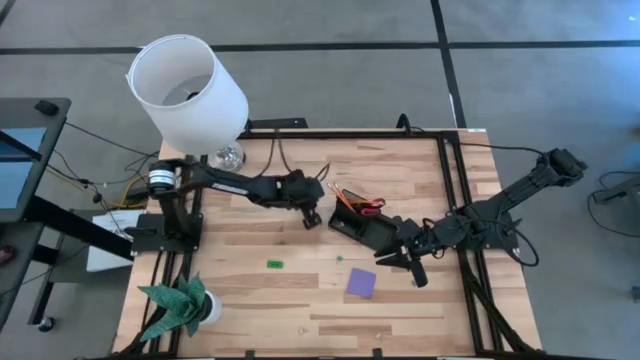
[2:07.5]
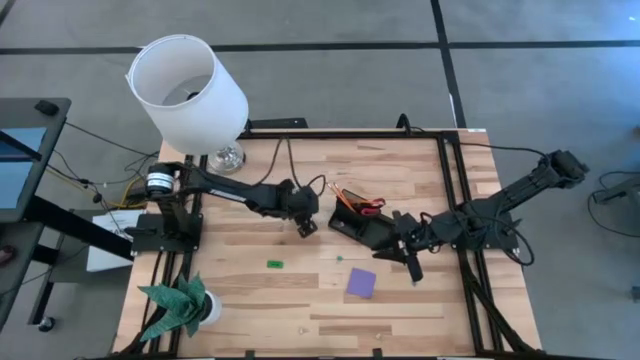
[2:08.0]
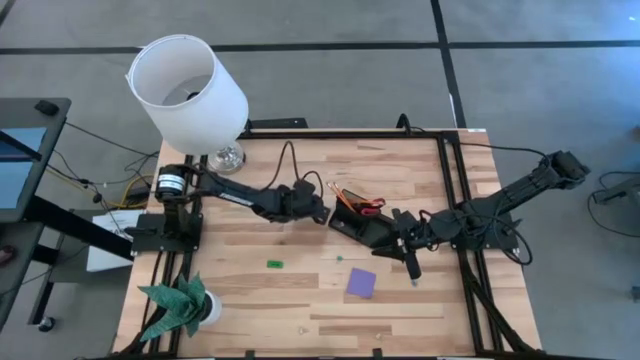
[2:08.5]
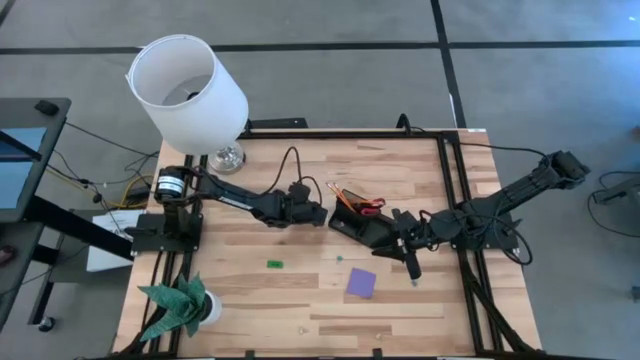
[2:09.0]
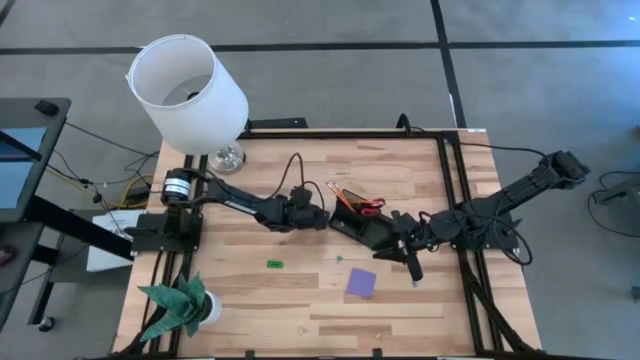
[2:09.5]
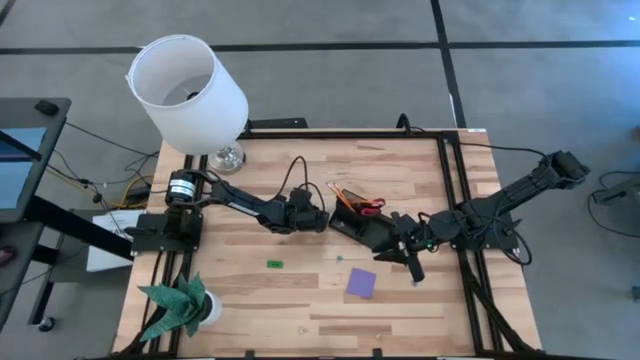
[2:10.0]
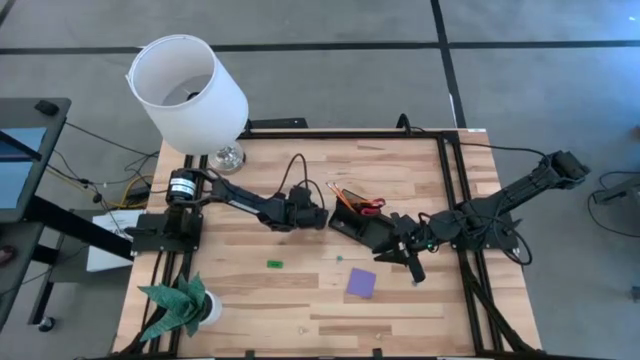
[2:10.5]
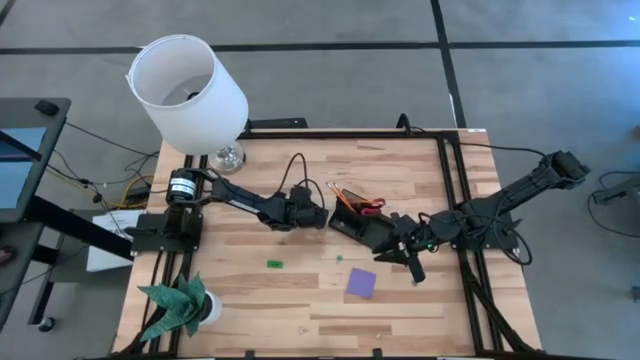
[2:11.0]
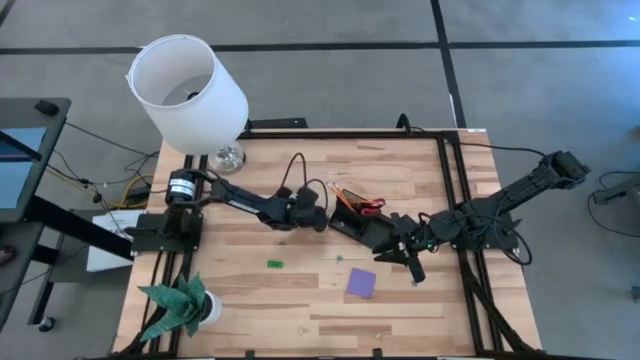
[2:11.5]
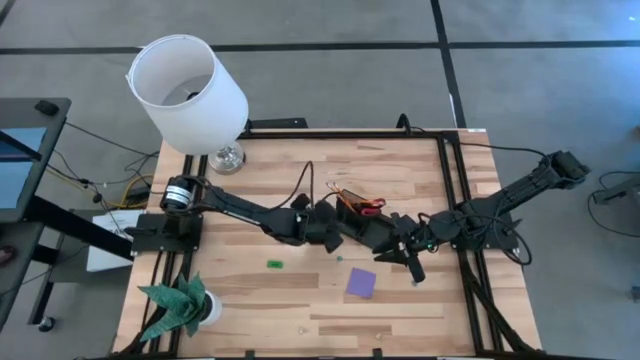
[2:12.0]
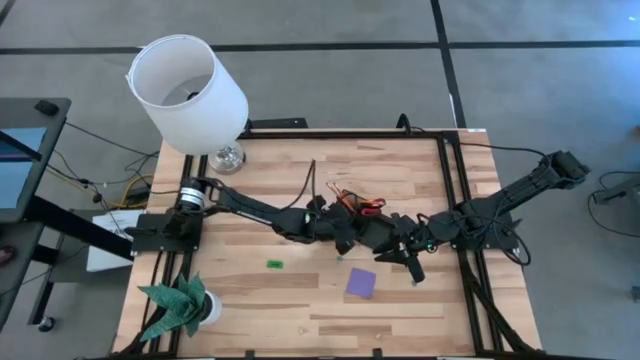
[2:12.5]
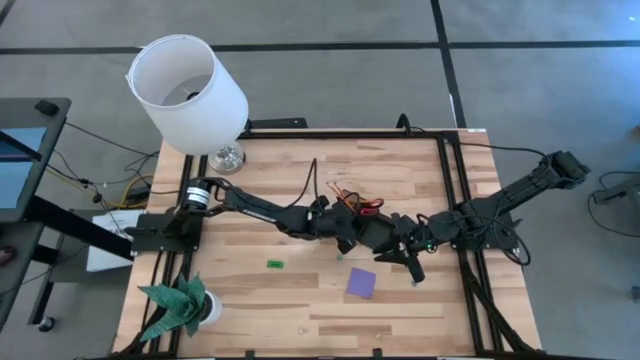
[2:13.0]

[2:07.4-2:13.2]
Task: Pick and place office supplies into organizer
Put the top blue binder clip into the black desk organizer

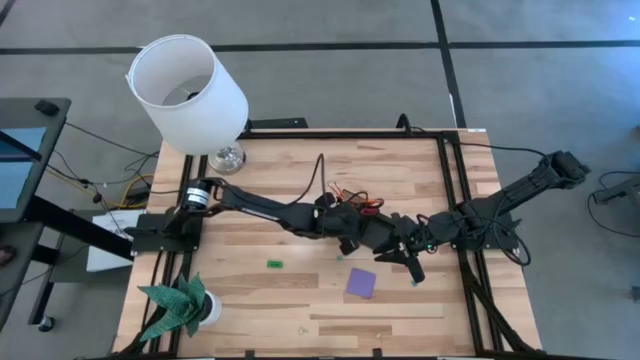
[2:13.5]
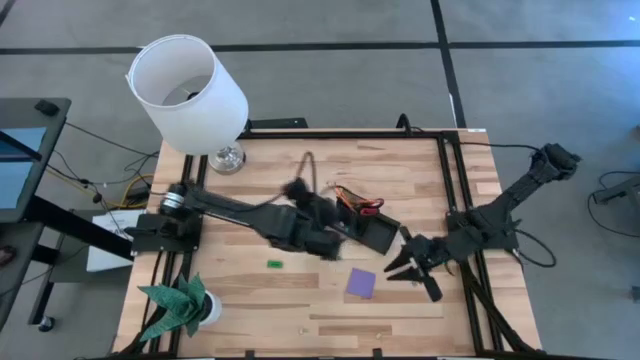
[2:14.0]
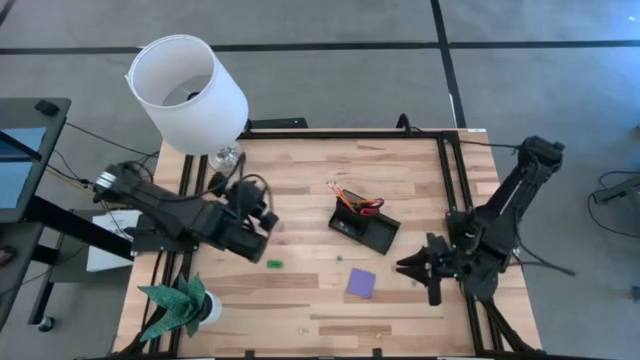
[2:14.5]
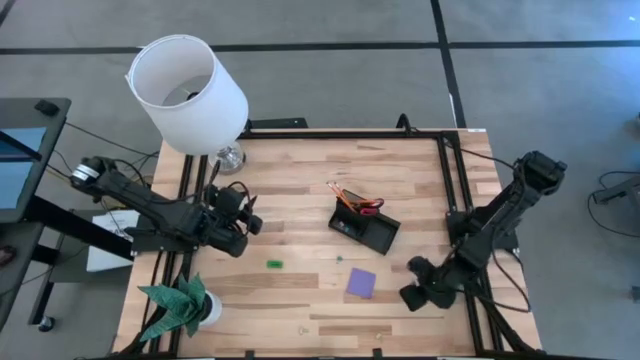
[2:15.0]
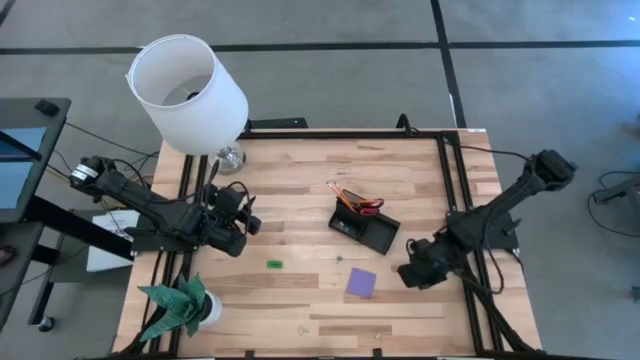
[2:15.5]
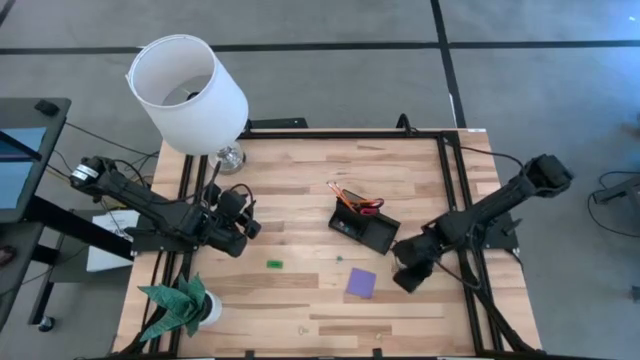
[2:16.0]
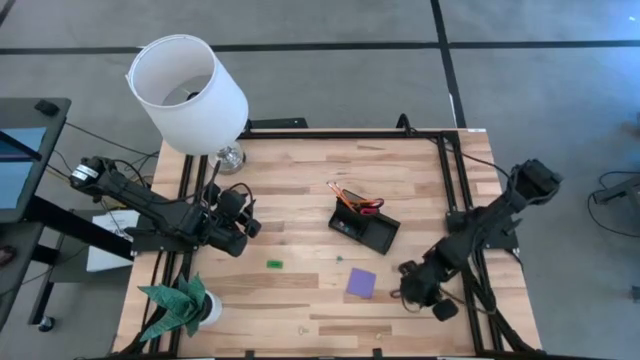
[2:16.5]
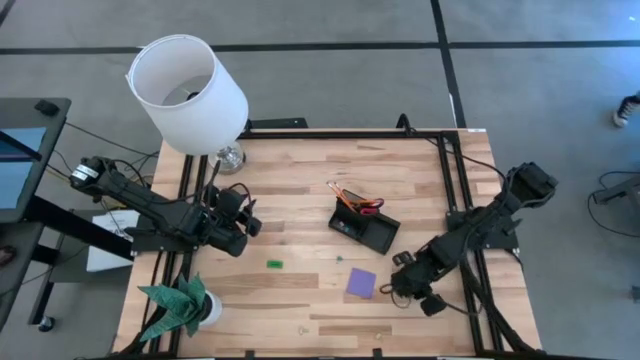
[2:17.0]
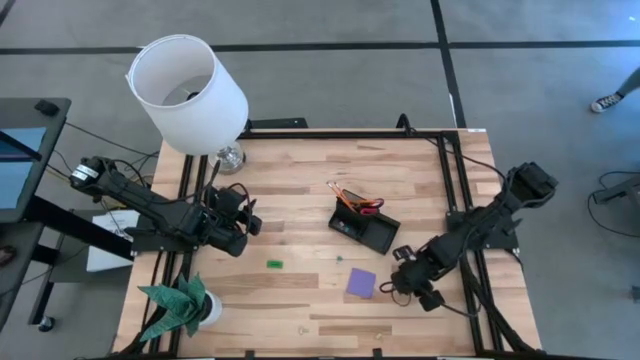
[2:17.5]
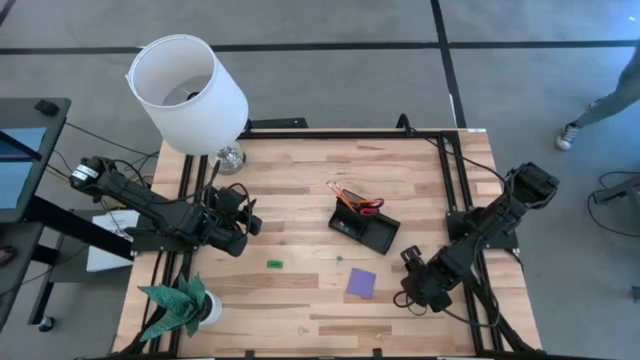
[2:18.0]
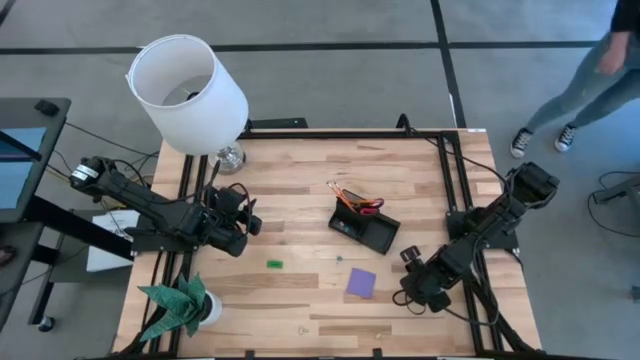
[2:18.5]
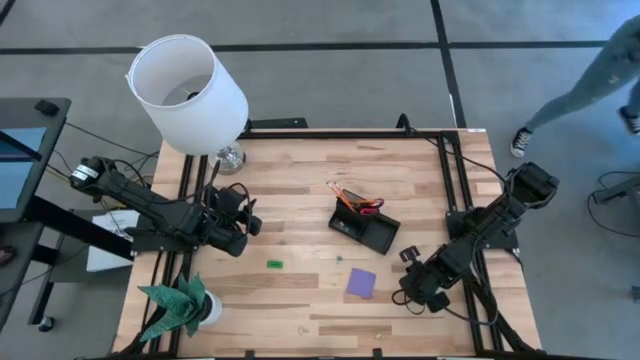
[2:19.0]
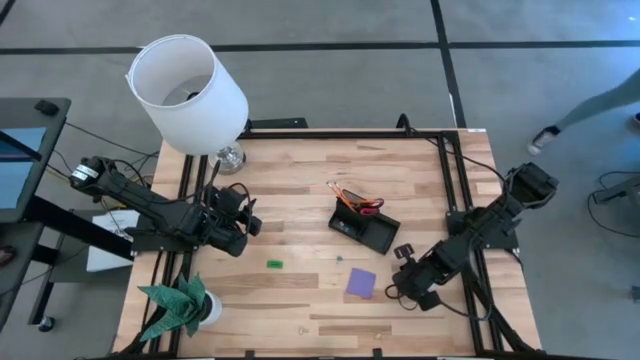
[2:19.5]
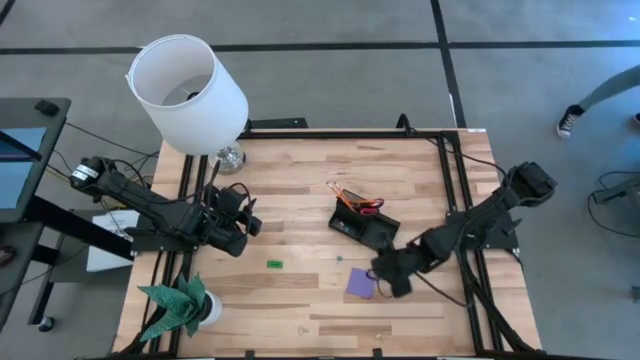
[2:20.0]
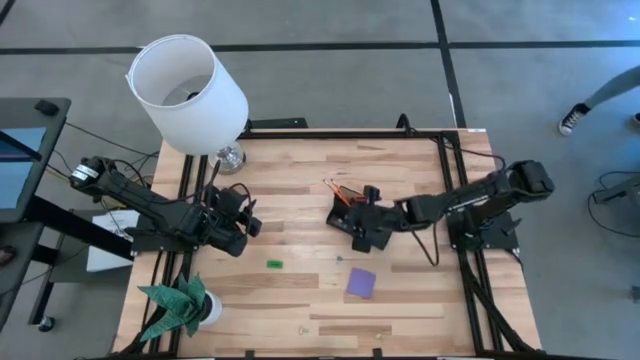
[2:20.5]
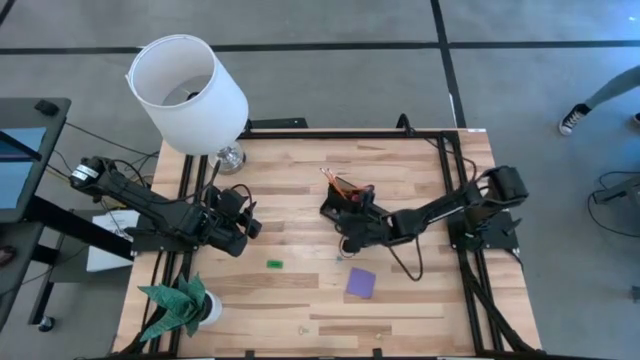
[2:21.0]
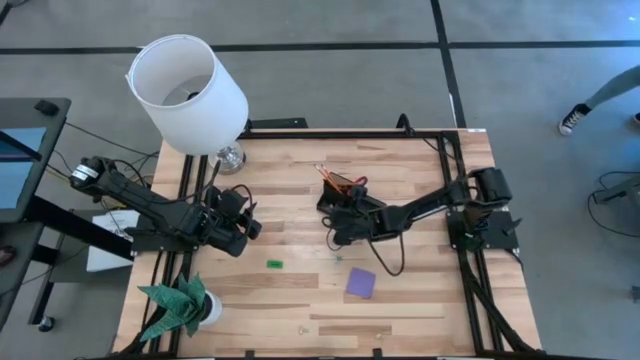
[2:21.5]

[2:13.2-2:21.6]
Put the blue binder clip into the black desk organizer

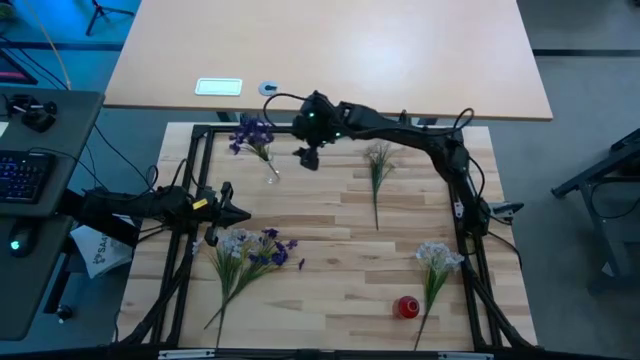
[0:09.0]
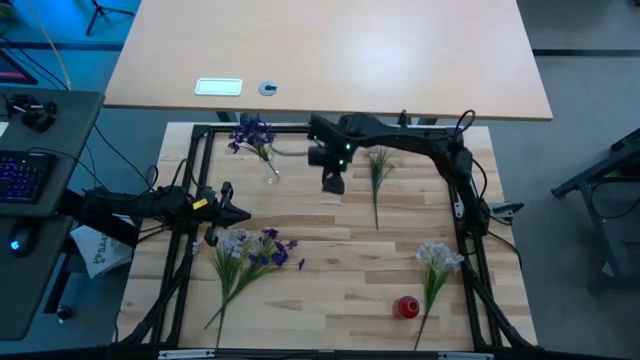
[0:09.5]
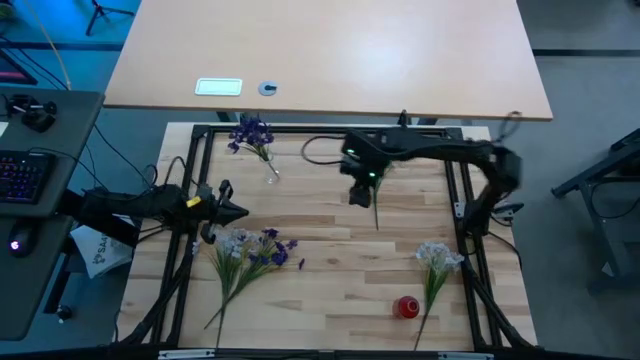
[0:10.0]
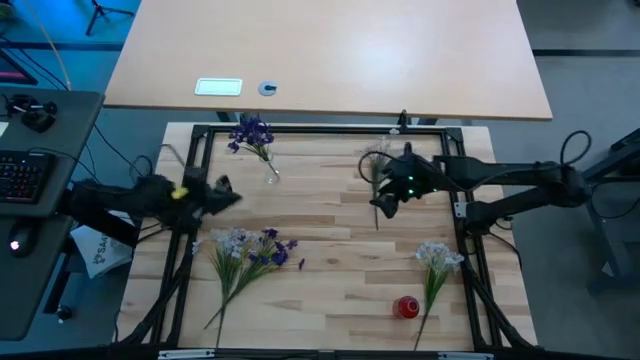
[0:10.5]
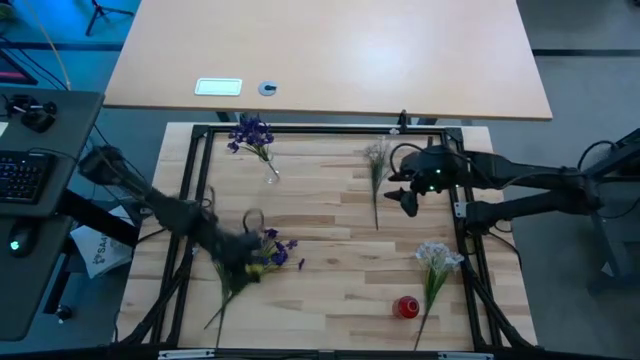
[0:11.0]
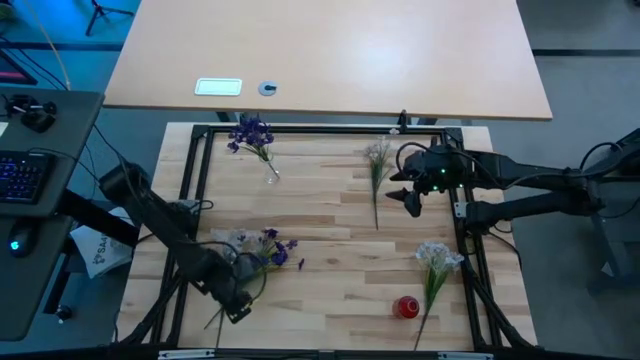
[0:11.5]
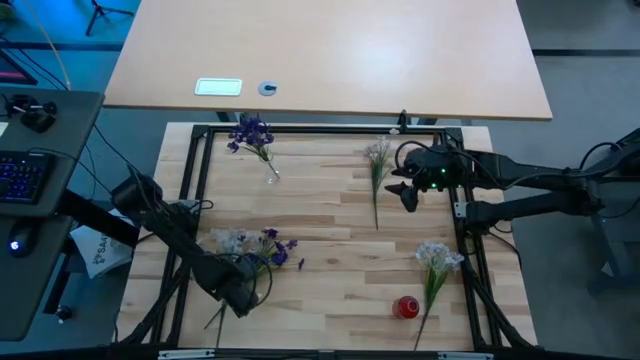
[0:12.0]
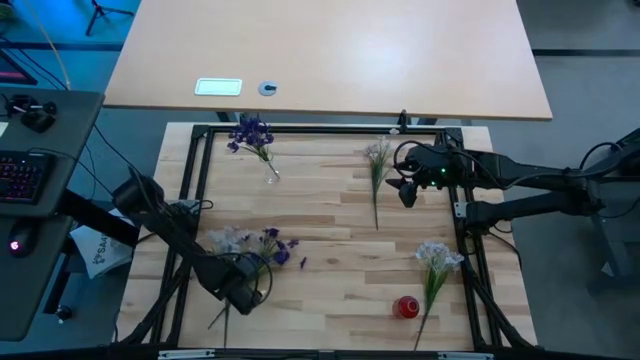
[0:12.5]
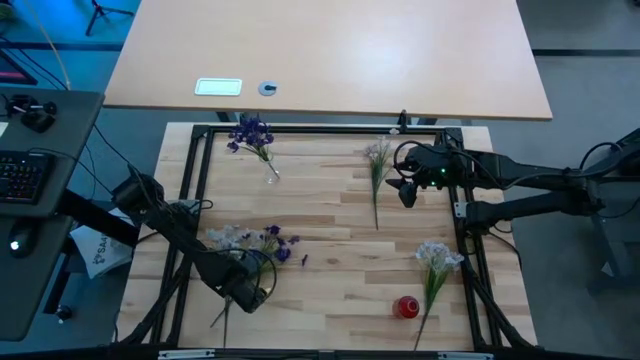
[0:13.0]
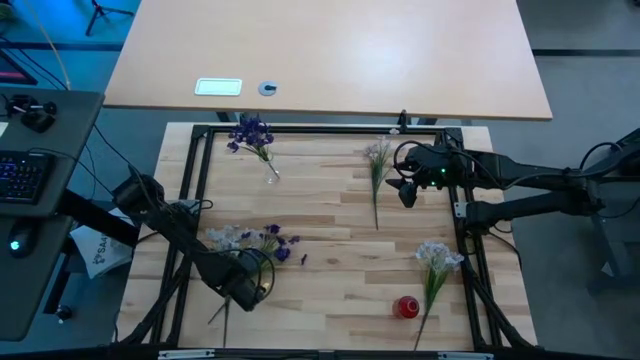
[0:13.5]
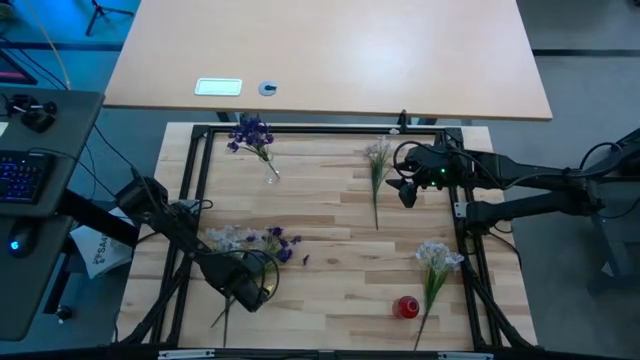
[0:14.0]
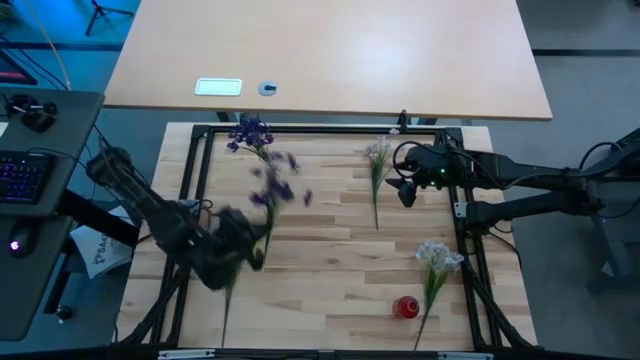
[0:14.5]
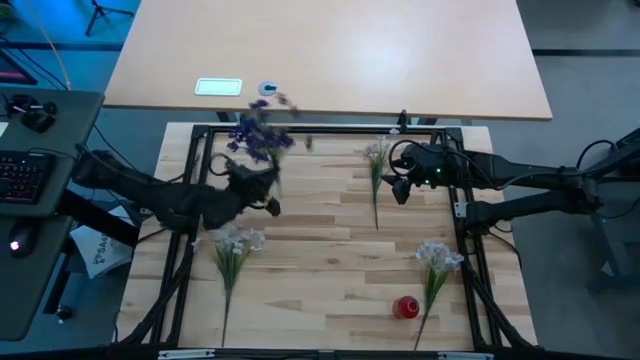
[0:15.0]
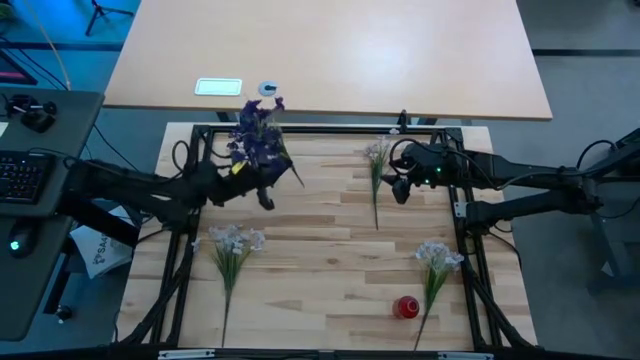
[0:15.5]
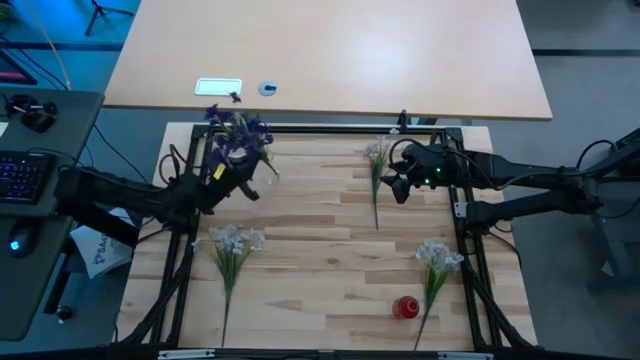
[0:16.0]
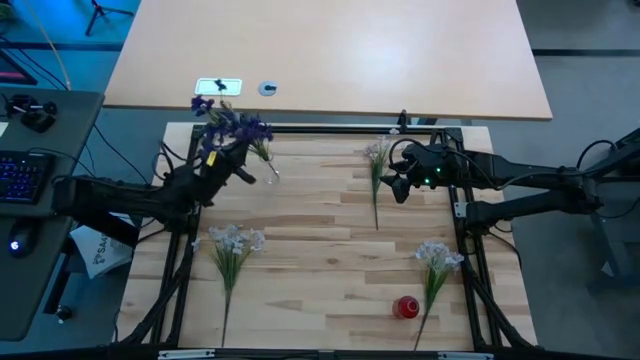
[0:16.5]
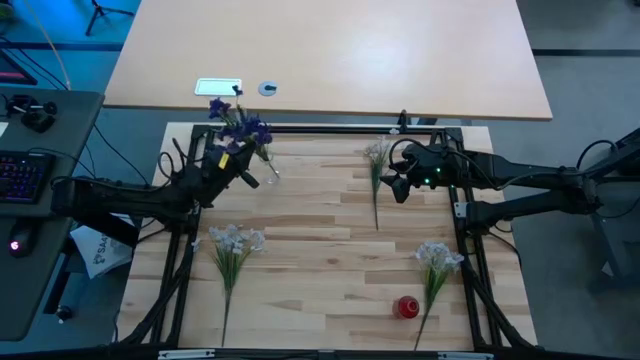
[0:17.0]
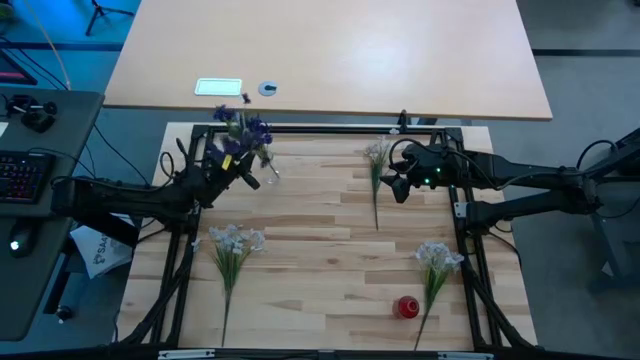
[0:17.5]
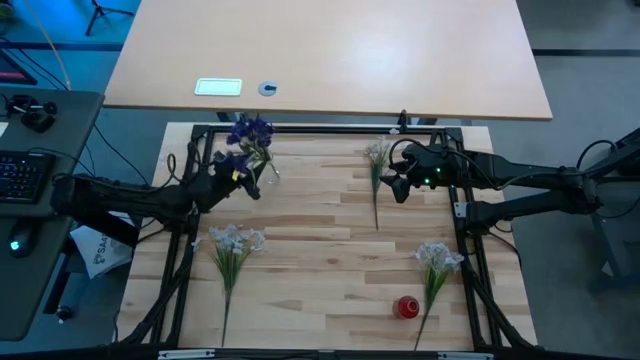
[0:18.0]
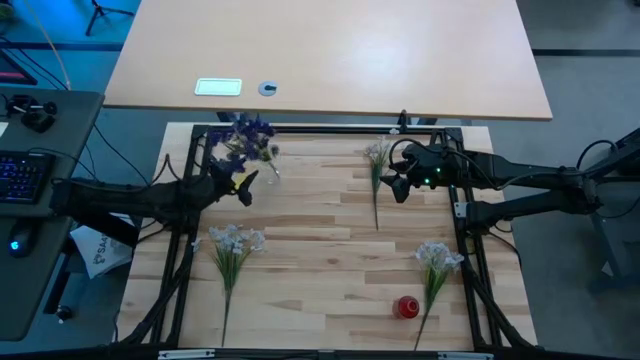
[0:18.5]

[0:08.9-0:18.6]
Task: Sort flowers into vase by color
Put the purple flowers into the white vase
